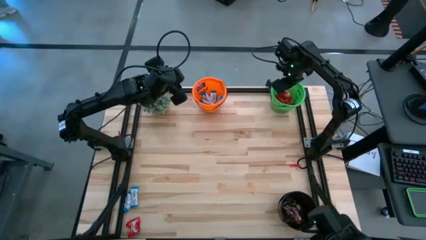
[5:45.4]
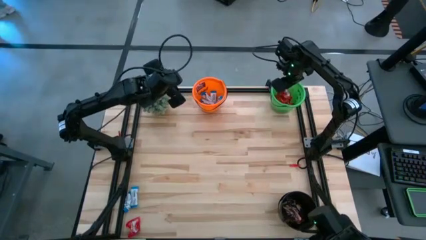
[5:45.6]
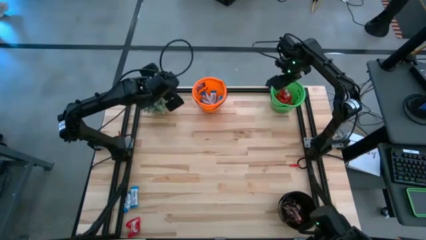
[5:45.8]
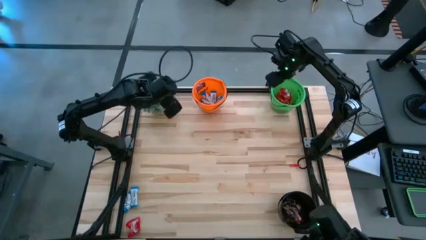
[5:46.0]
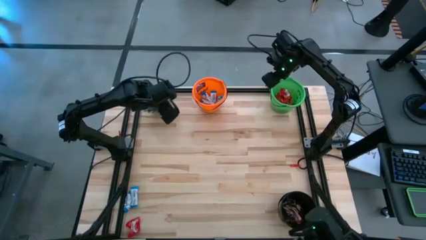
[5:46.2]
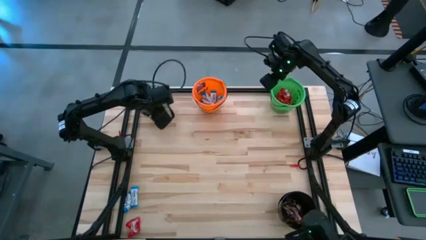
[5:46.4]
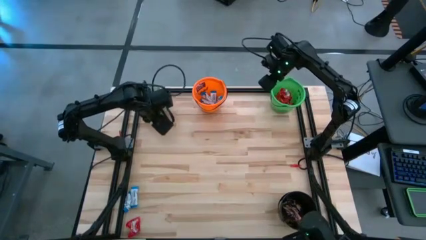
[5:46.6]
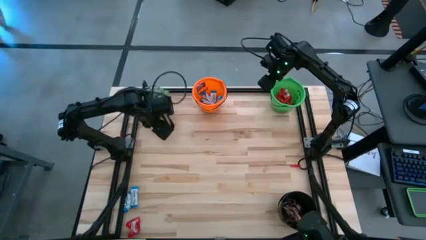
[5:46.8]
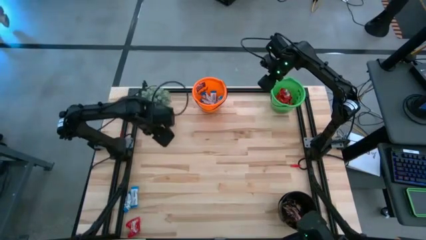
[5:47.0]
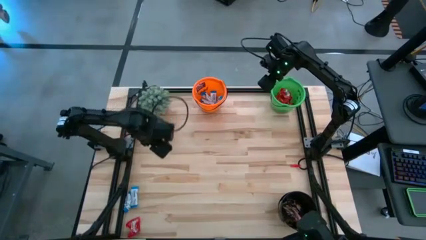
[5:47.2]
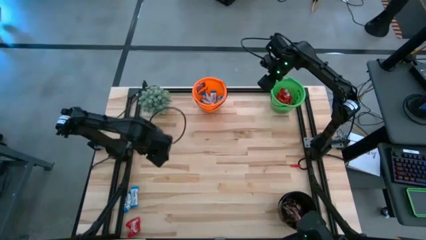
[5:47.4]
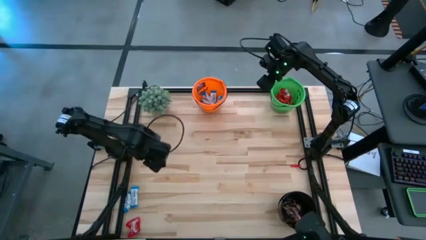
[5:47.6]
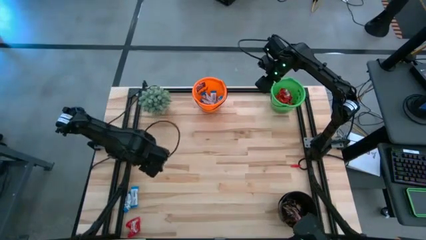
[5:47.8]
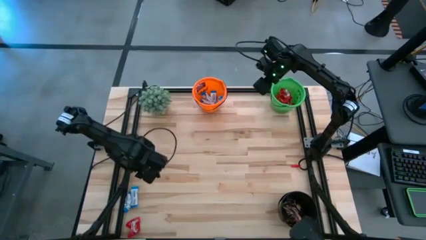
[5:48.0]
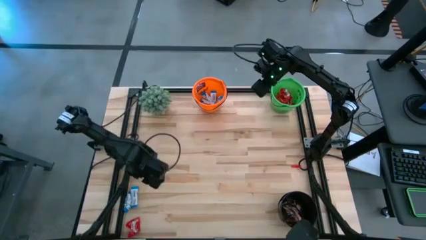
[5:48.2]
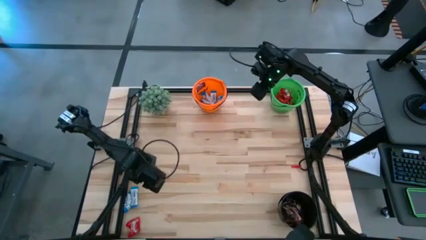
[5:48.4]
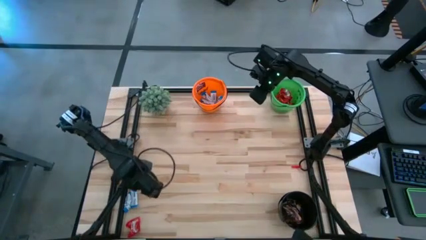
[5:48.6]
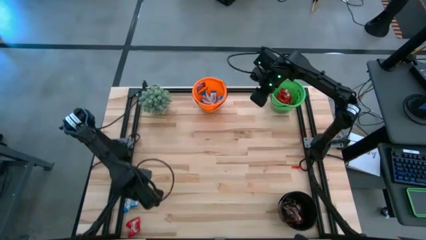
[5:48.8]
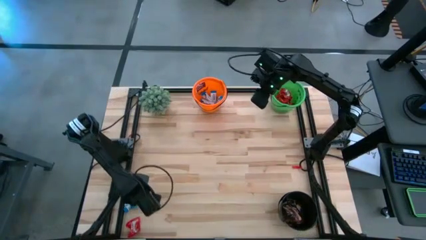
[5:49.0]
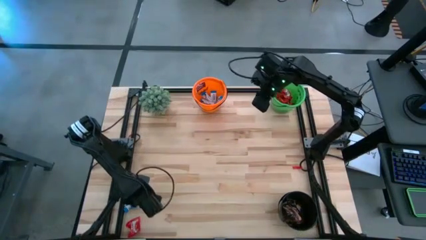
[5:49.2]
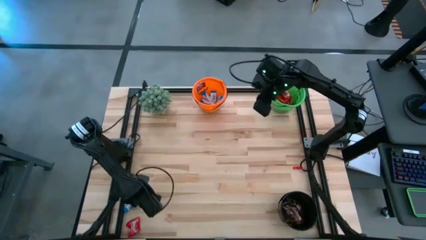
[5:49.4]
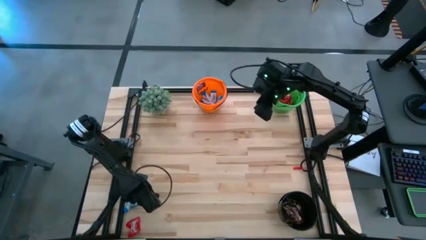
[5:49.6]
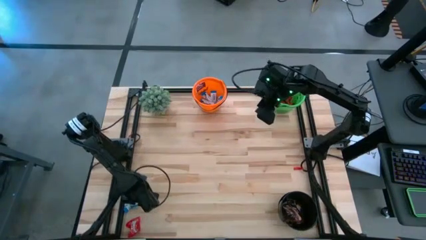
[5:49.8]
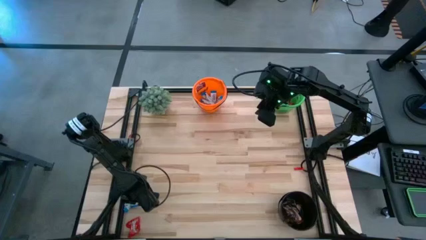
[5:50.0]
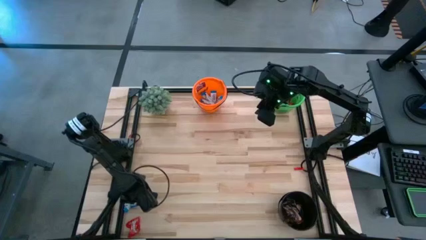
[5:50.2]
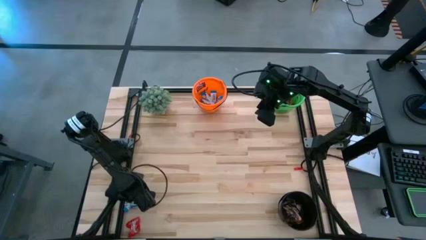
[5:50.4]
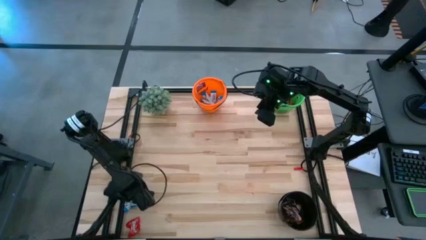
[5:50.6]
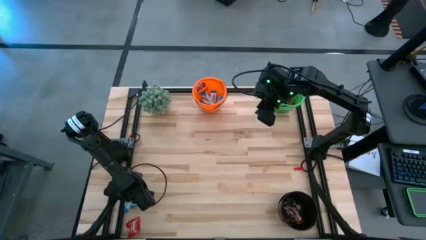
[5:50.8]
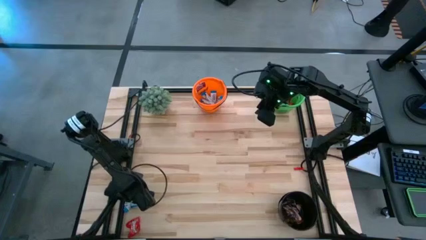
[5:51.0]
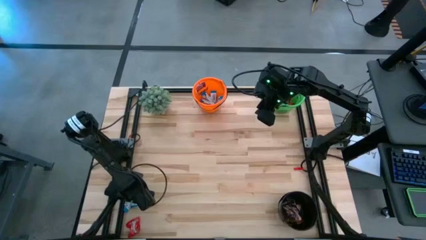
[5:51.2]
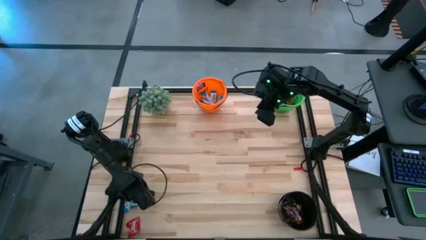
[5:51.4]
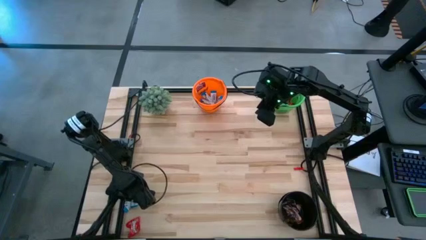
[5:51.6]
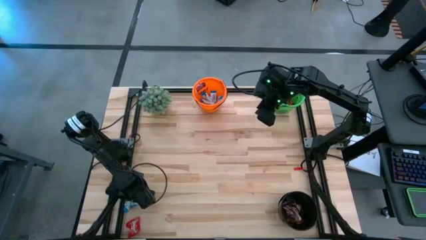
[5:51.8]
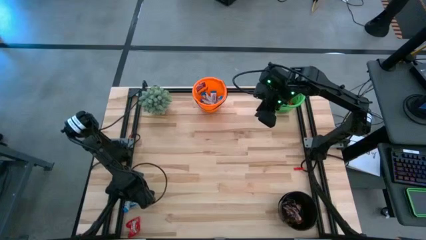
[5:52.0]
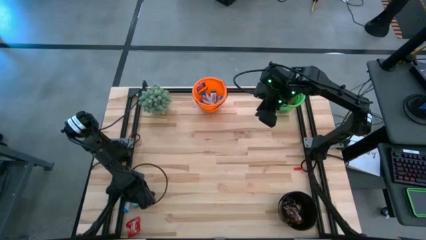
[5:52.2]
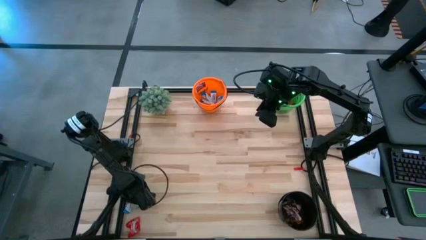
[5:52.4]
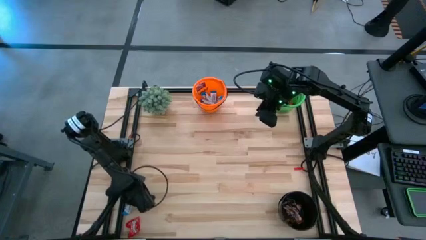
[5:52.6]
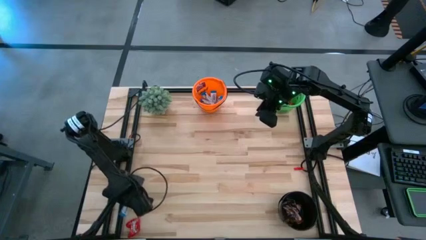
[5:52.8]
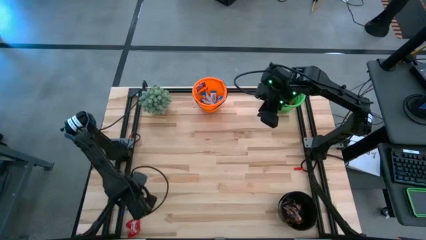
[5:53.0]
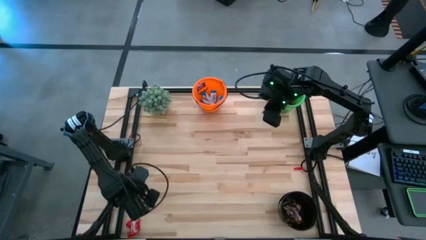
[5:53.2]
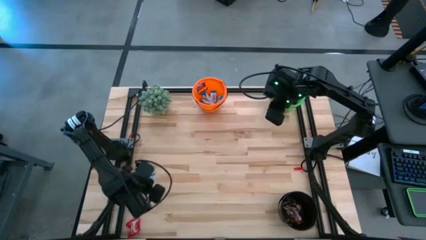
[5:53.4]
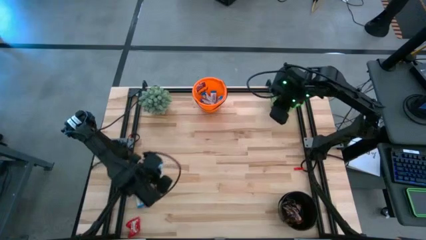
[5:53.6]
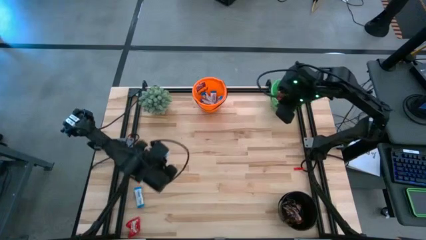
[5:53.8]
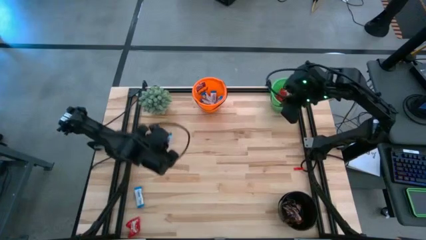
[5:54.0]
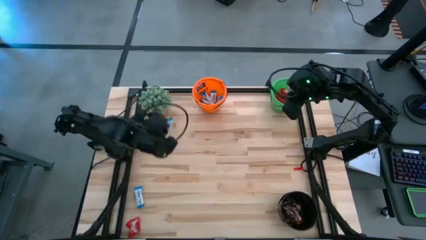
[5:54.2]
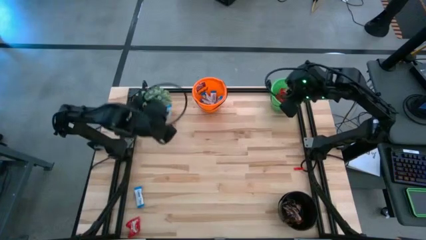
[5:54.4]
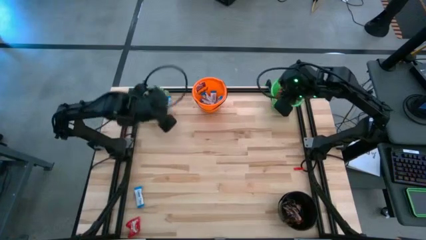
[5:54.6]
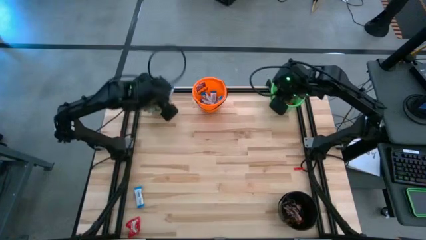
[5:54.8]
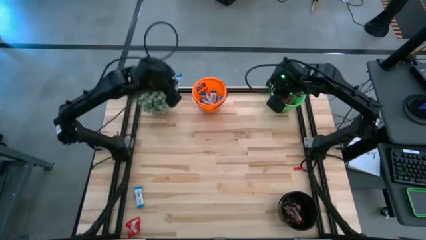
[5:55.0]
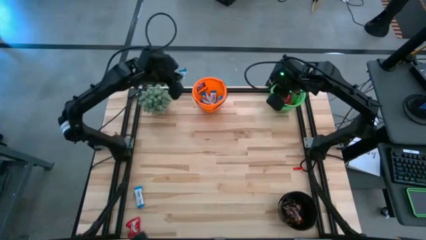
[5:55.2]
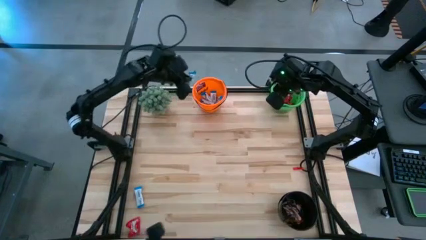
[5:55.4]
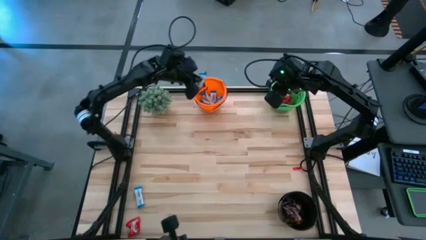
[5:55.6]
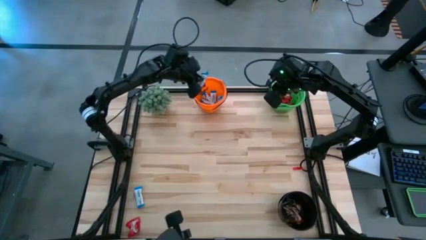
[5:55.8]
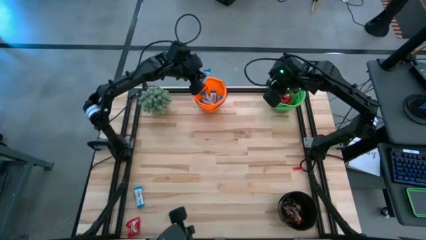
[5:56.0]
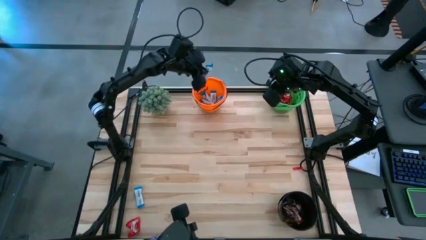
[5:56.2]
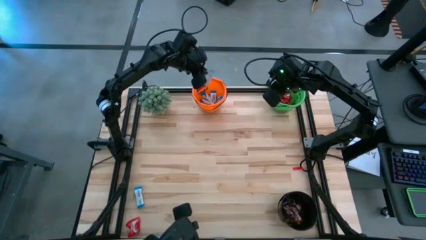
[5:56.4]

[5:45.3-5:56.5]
Task: Organize candy in baskets
Put the white chocolate bar into the orange bucket
